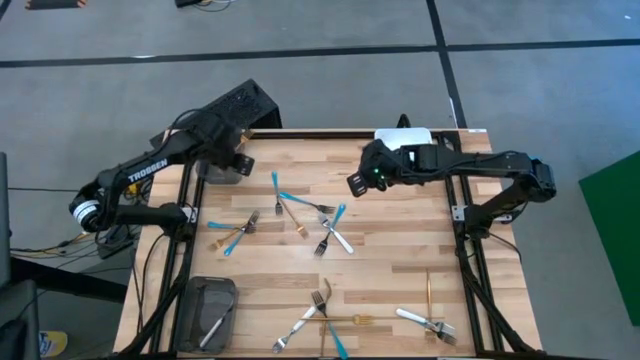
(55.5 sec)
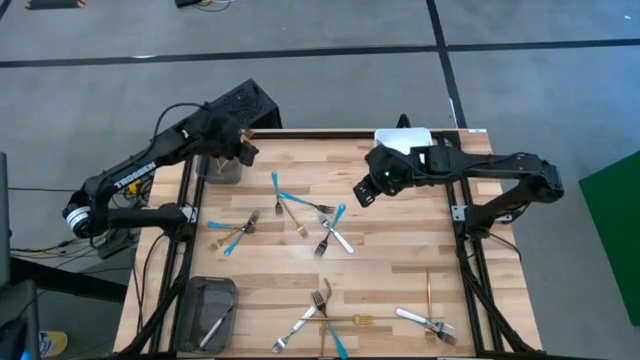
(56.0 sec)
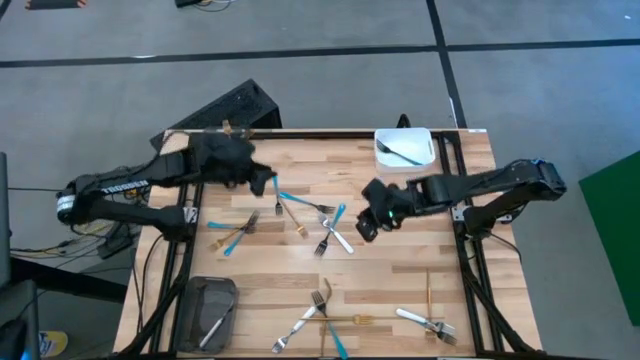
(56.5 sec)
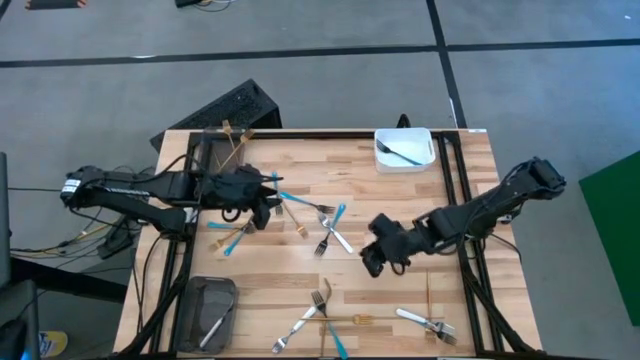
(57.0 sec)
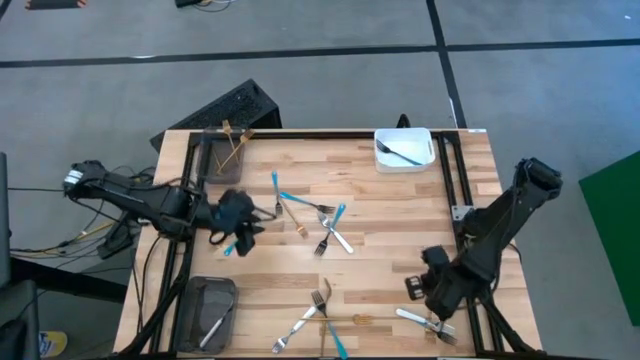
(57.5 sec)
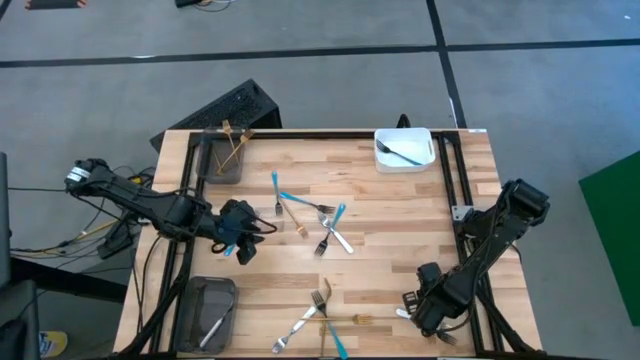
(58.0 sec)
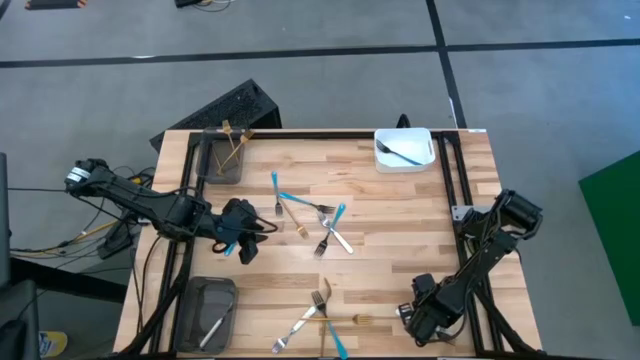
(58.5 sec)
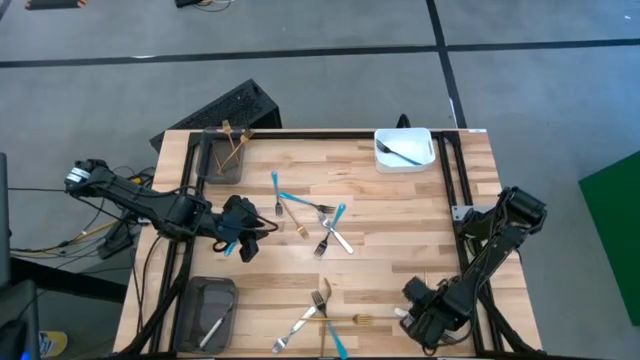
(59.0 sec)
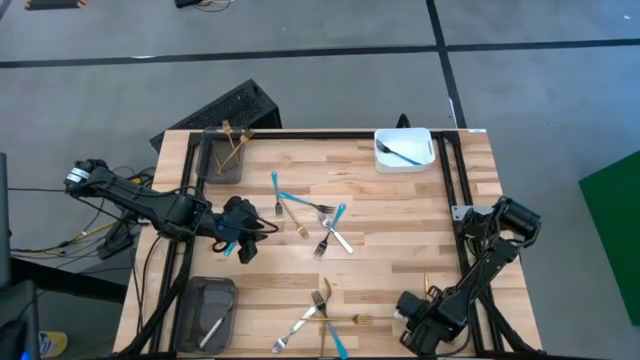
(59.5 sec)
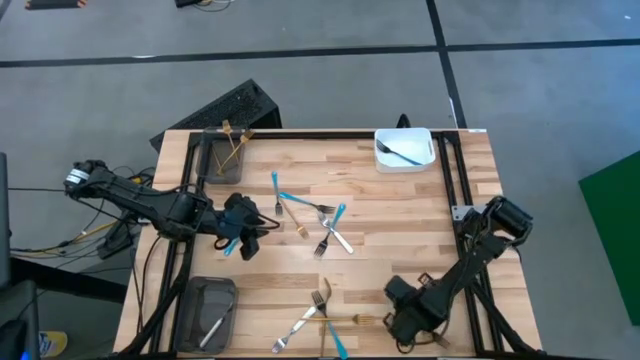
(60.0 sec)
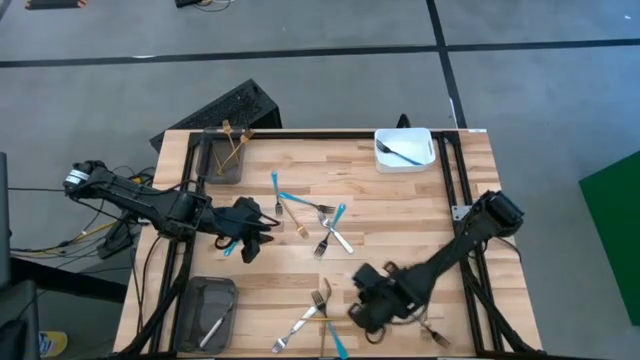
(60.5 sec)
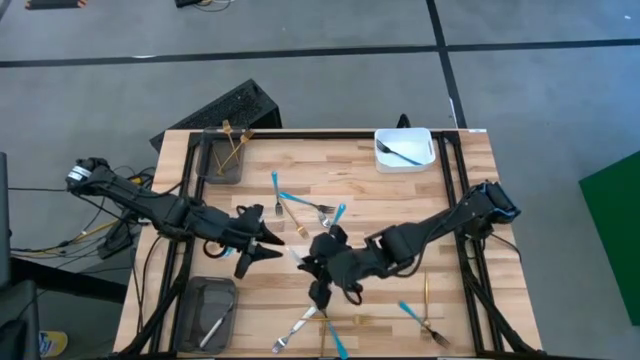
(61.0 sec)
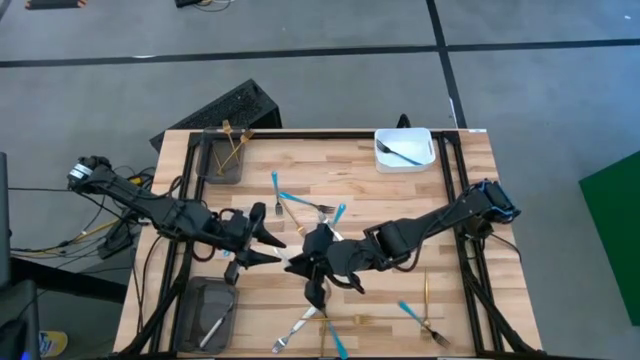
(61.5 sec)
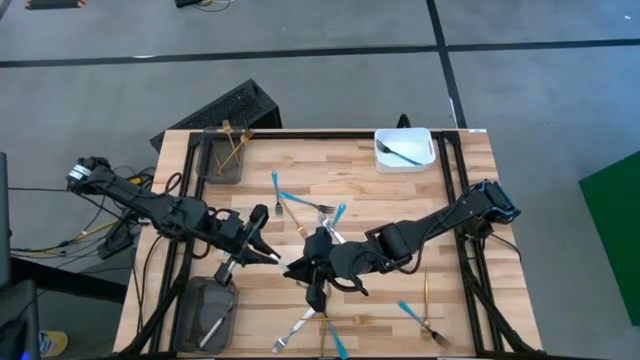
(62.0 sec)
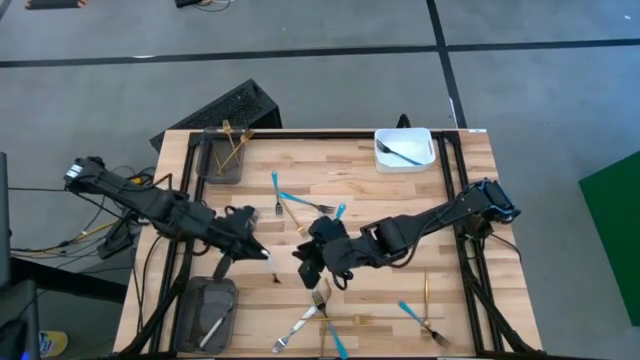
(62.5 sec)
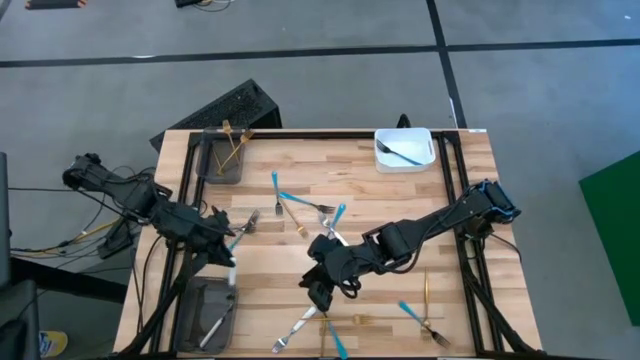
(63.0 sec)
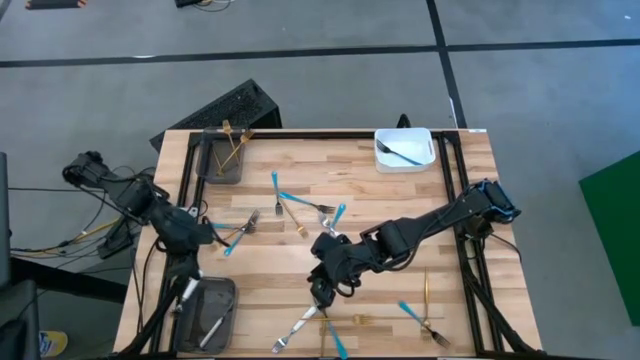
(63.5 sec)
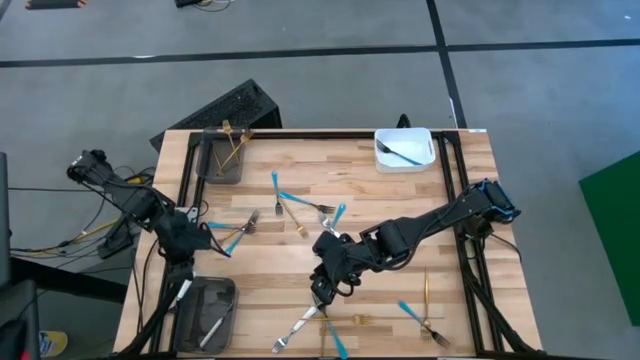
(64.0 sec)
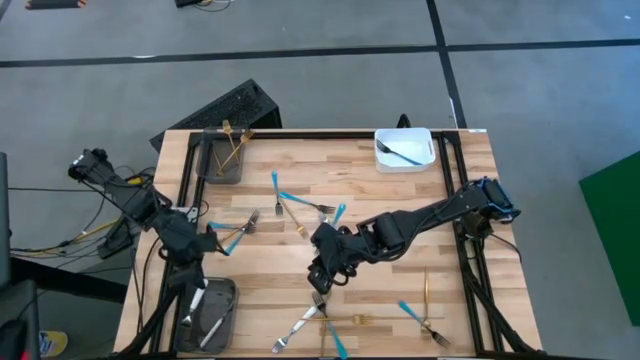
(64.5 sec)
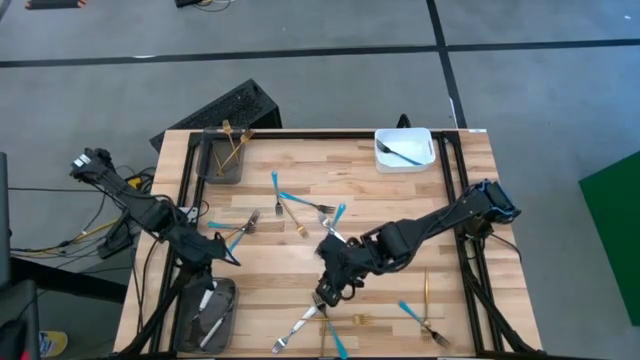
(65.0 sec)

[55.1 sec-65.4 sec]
Task: Sort silverware by color (type)
Put the white fork into the bottom black bin

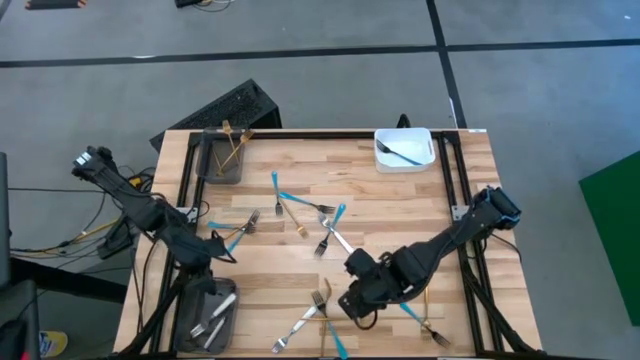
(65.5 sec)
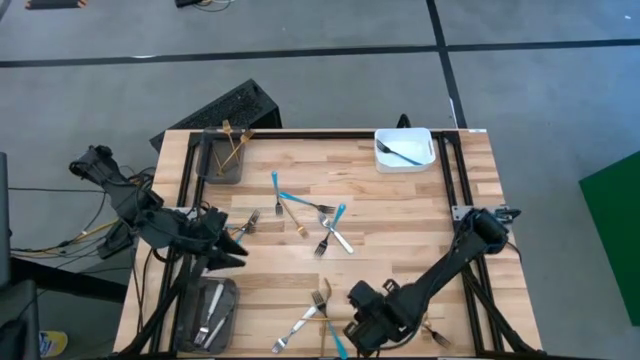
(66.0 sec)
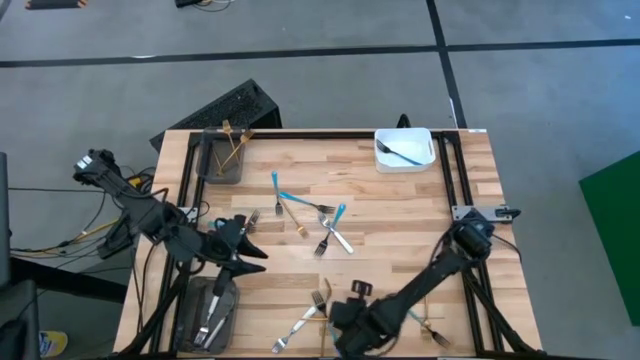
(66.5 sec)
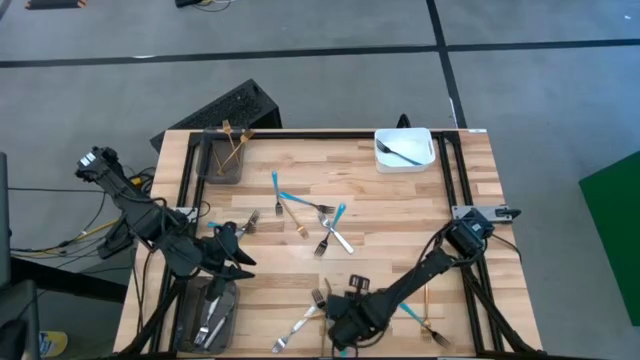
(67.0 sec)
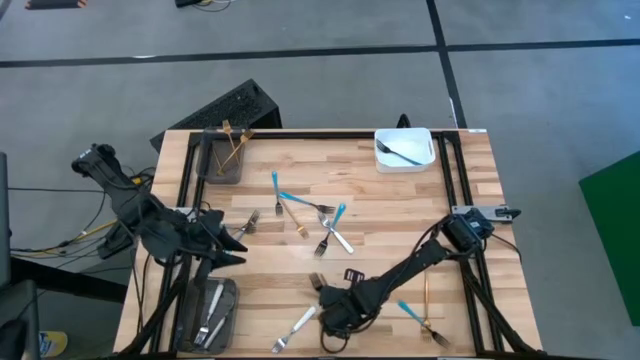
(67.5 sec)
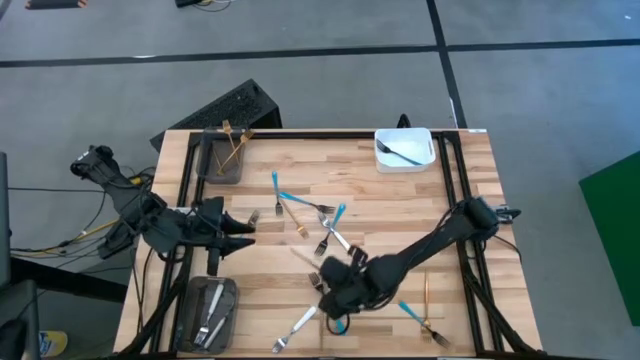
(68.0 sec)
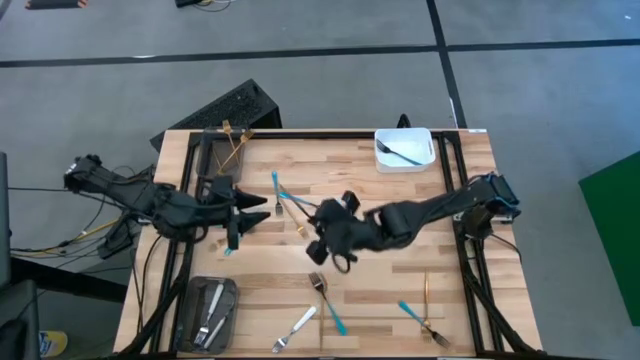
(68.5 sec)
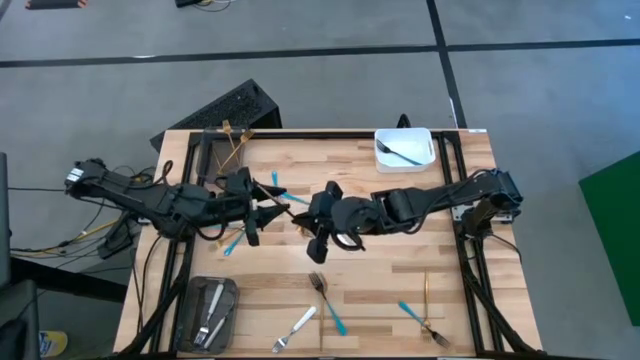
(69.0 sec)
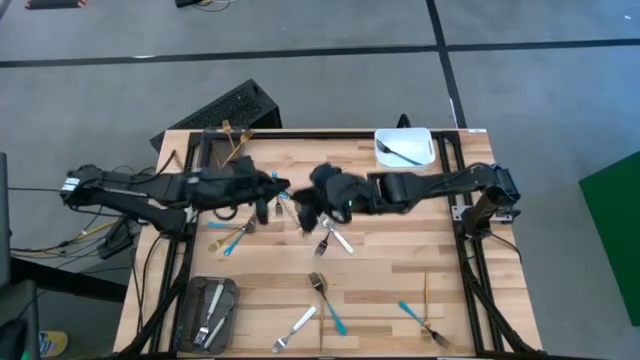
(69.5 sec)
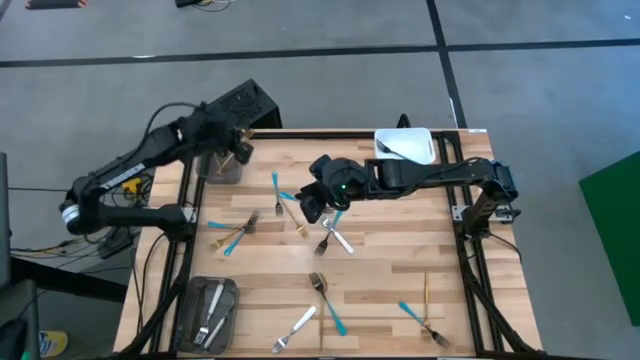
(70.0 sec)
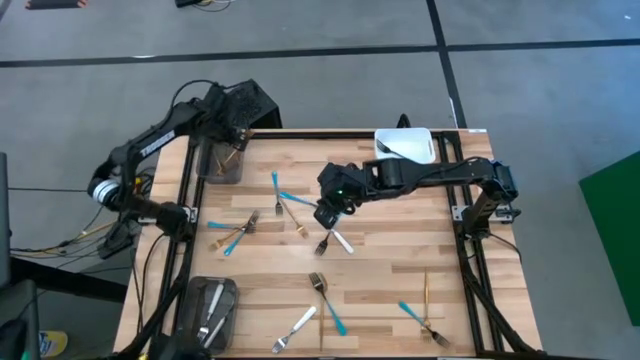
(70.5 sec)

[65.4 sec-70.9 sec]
Put the gold fork into the top black bin

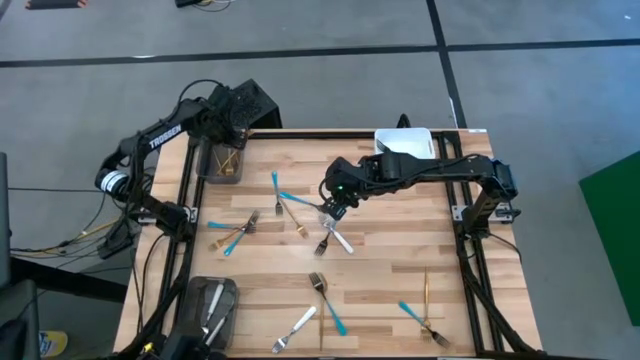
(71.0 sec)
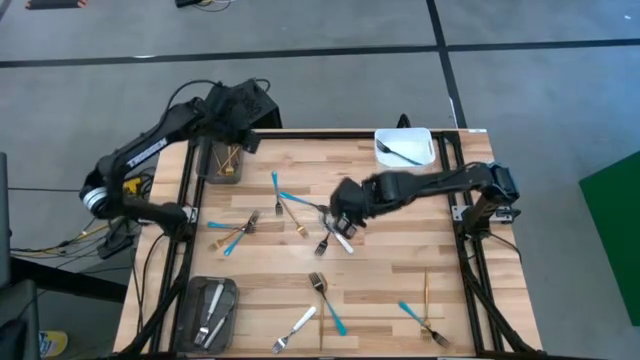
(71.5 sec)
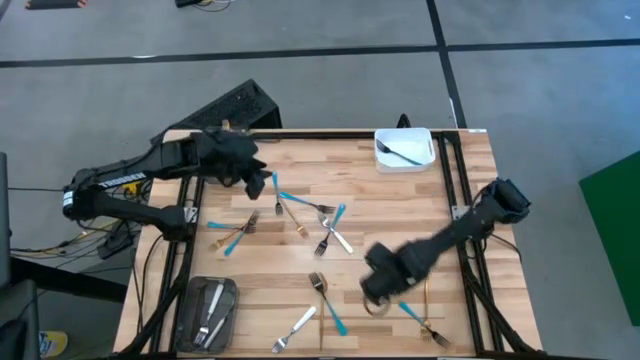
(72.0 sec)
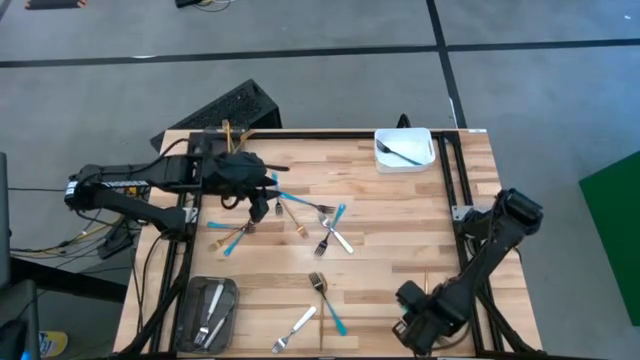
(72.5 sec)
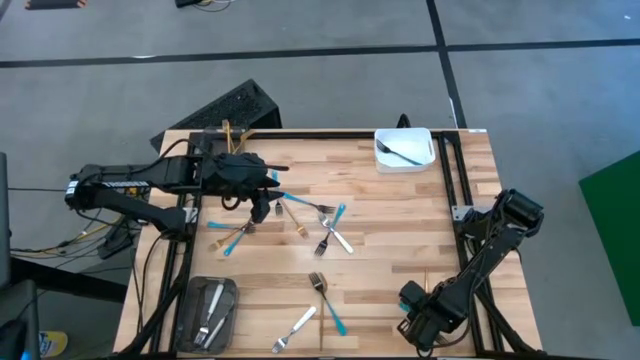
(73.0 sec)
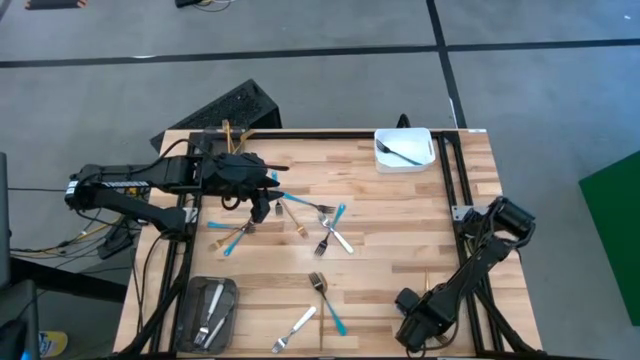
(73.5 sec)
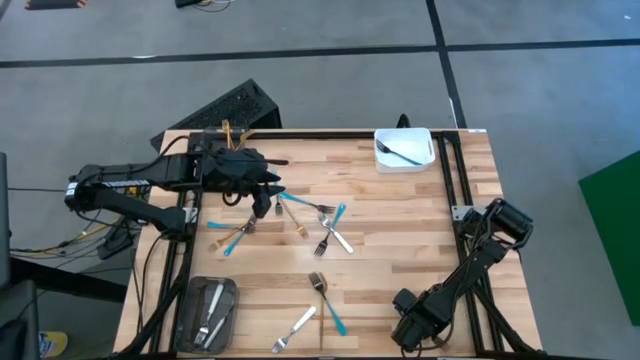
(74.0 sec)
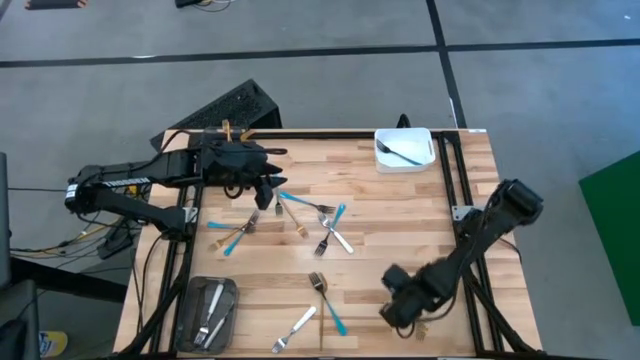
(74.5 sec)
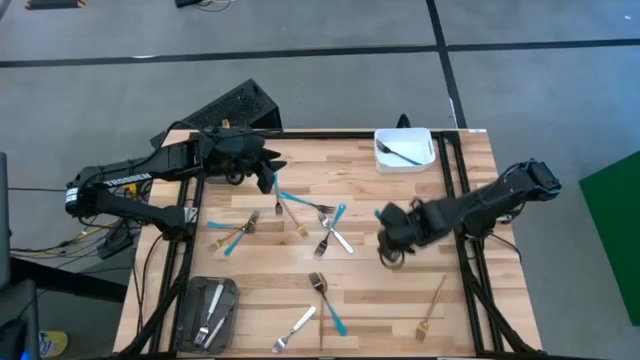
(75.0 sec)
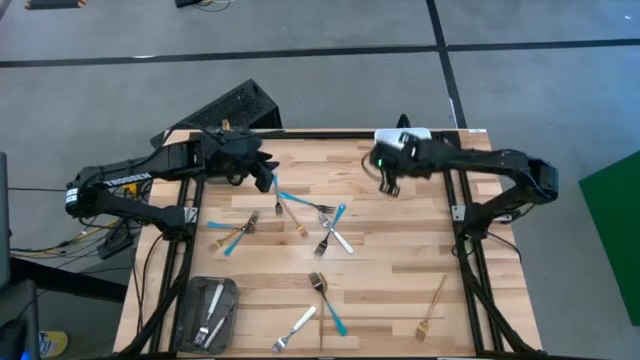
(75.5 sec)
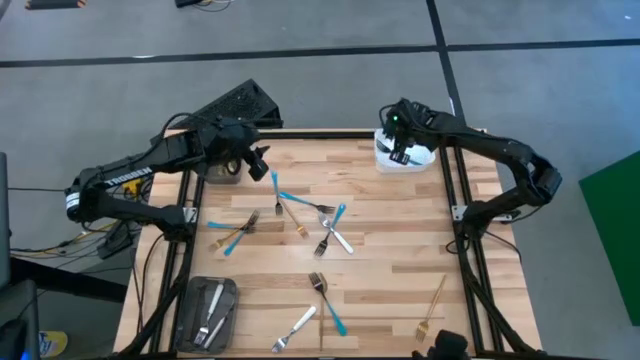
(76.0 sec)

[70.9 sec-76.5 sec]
Put the blue fork into the white bin
